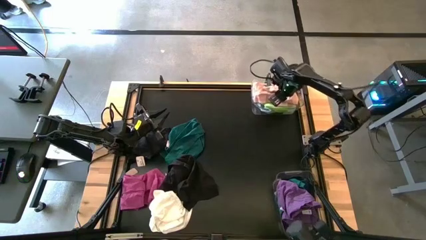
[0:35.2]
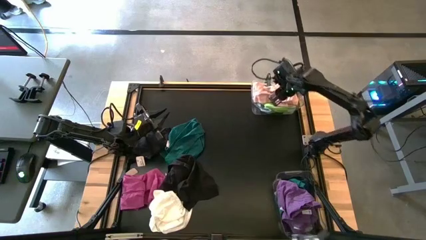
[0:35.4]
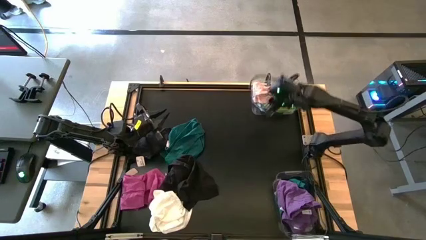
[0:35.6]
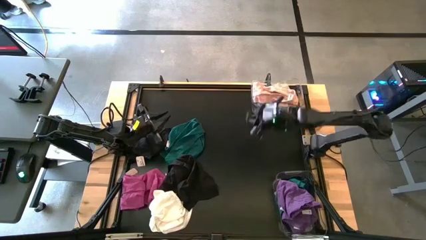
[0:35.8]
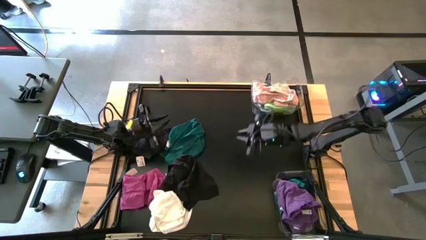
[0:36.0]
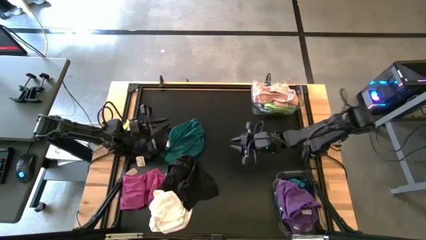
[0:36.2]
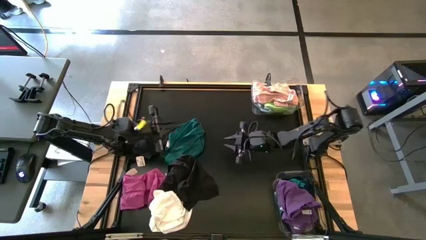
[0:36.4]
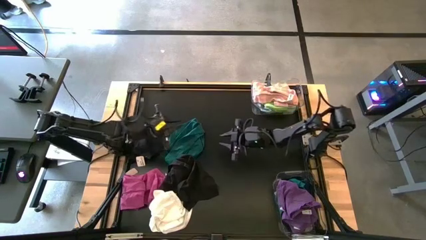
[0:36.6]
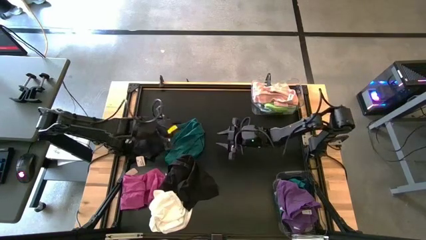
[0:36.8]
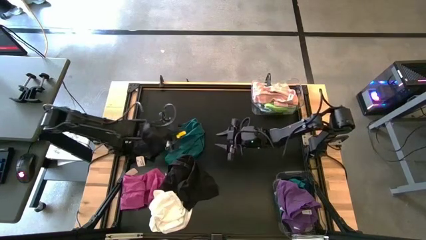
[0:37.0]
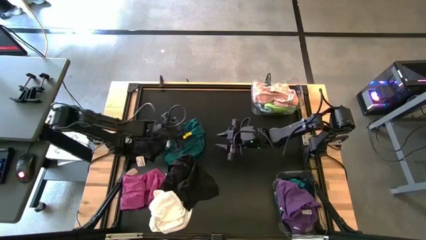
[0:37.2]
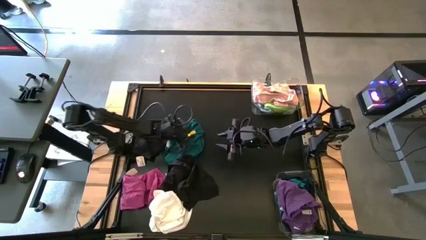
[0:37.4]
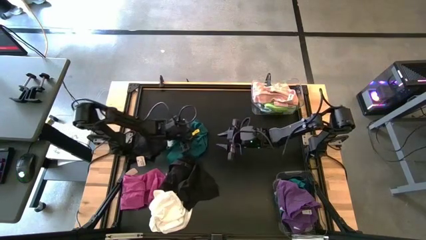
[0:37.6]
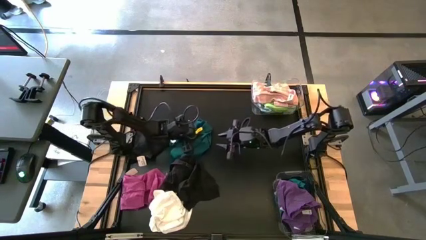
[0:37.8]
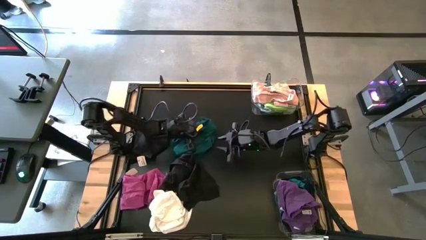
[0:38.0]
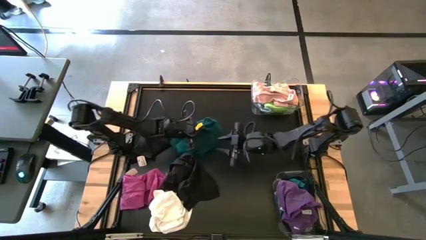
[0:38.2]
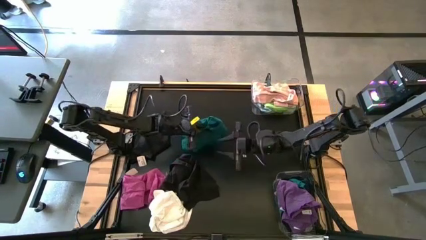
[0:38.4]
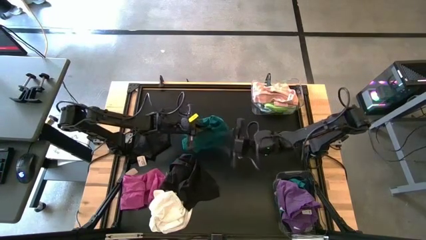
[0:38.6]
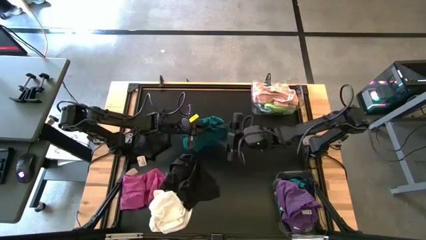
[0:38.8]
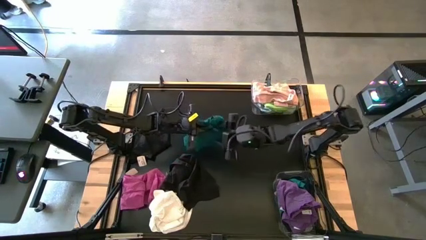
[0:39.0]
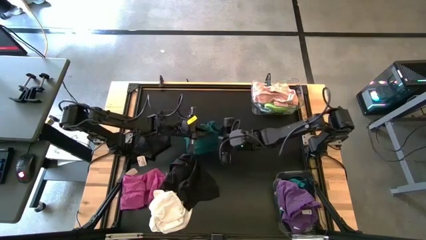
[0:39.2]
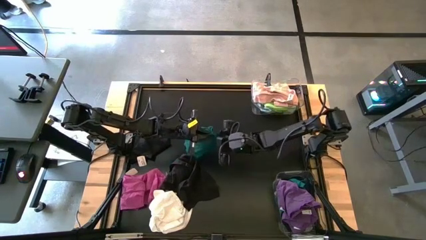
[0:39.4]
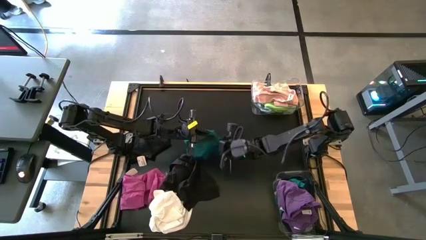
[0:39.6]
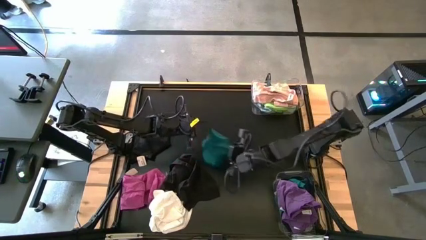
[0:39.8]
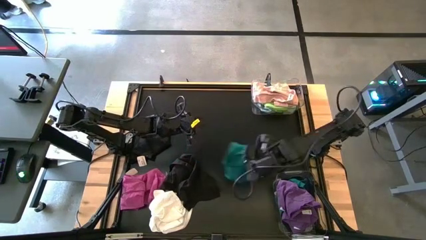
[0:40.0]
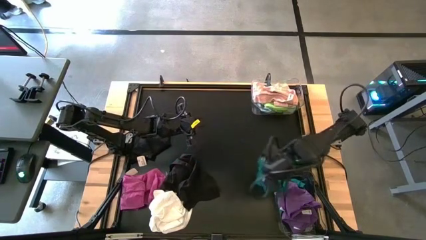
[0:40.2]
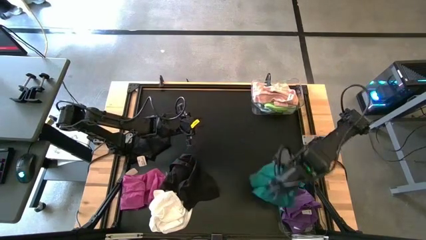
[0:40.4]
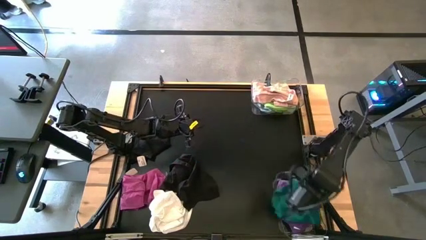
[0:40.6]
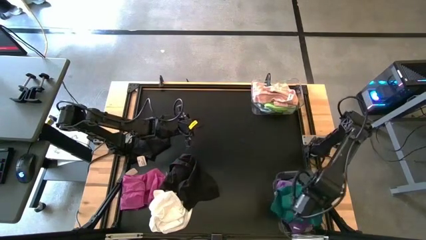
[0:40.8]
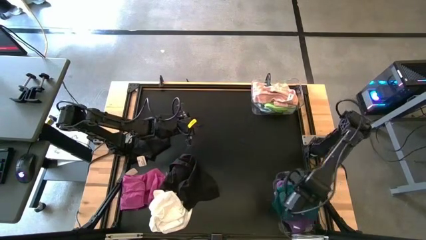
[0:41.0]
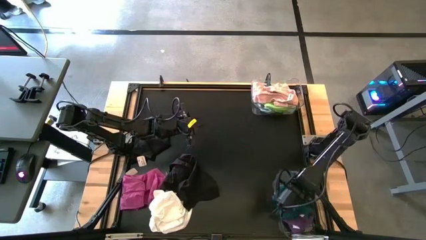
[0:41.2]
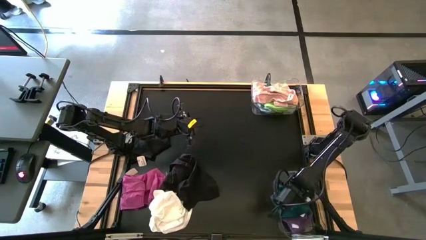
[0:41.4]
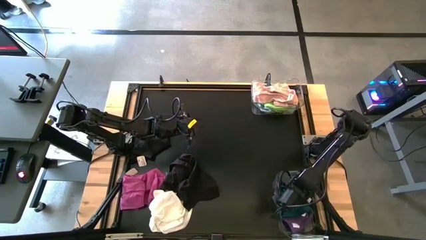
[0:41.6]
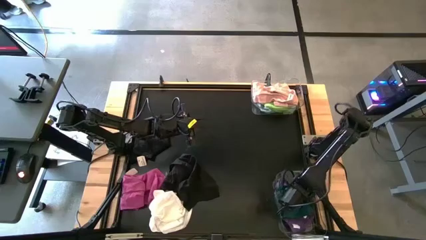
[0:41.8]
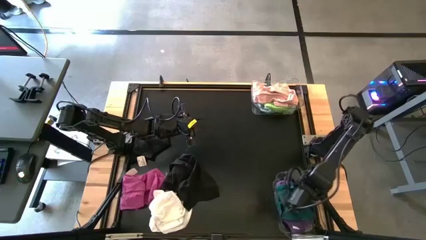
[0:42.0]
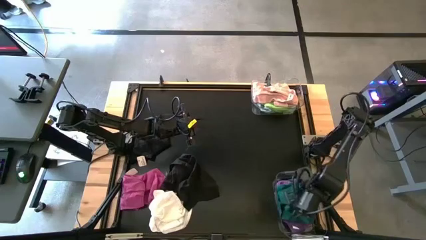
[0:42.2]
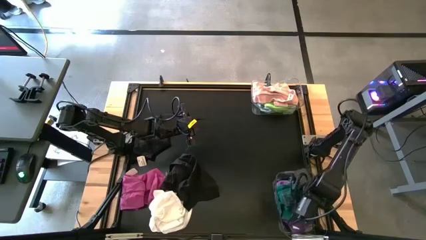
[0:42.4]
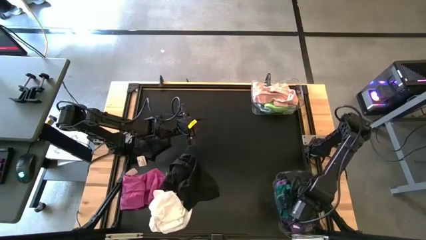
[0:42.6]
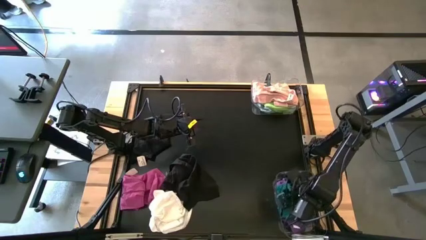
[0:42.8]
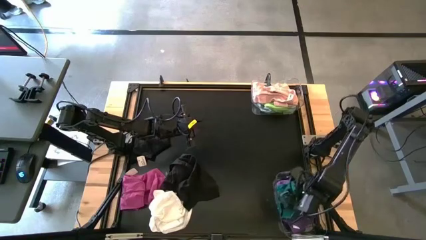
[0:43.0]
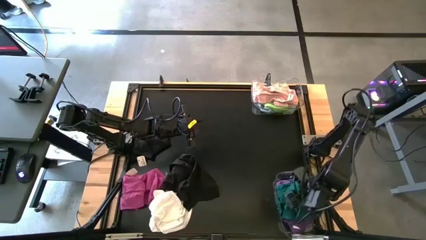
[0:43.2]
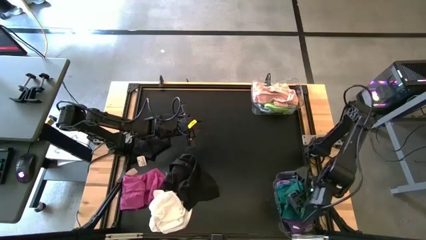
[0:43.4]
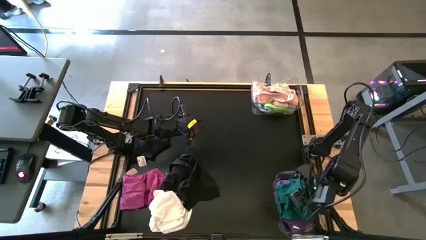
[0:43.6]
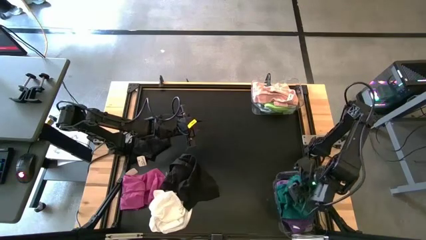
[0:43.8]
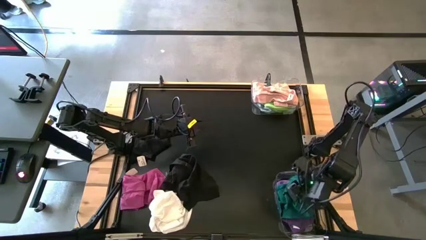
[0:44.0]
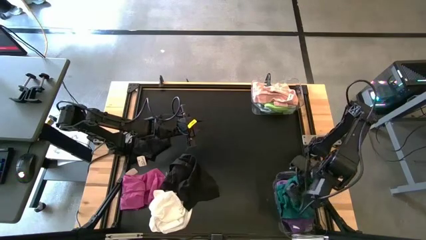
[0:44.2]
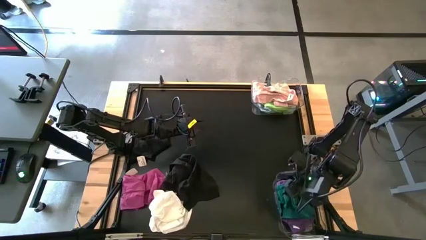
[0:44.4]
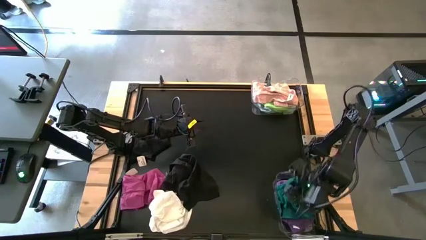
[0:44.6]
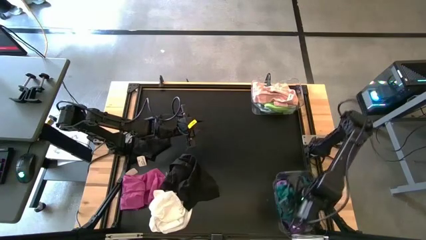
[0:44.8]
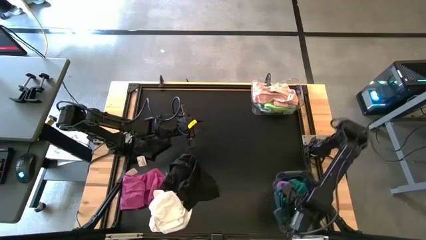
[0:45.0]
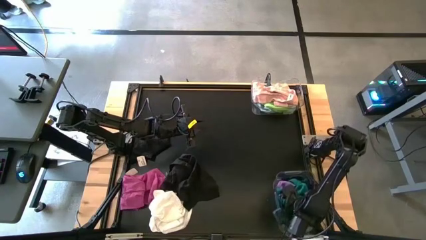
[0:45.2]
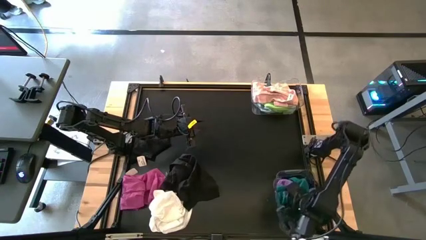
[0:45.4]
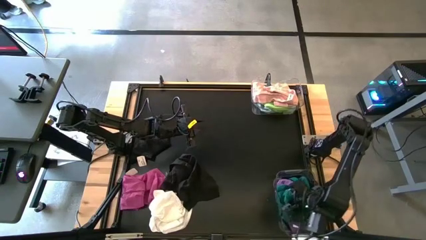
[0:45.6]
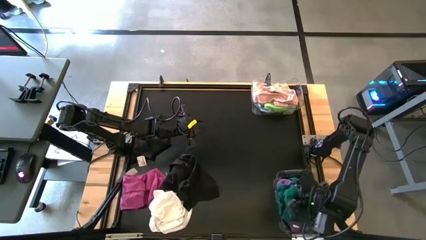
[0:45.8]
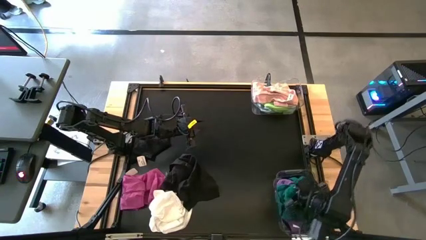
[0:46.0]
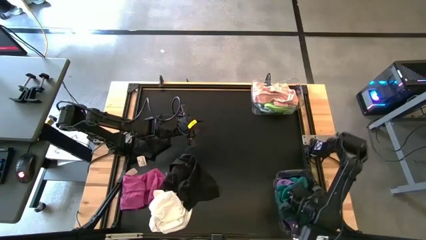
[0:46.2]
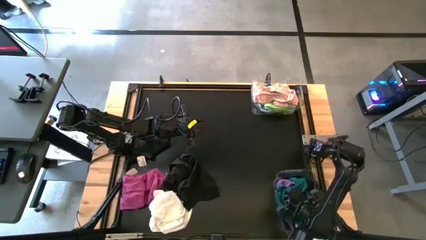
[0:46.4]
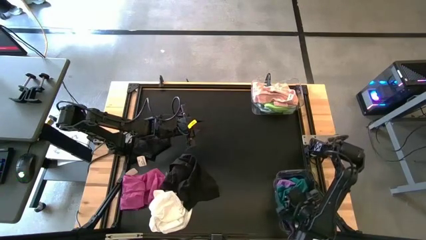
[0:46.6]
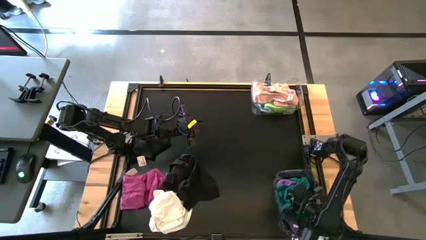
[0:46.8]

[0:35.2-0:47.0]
Task: Sort towels by color in basket
Put the dark green towel into the bottom transparent bin
